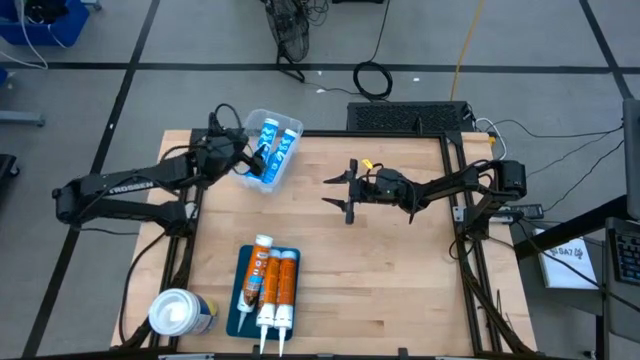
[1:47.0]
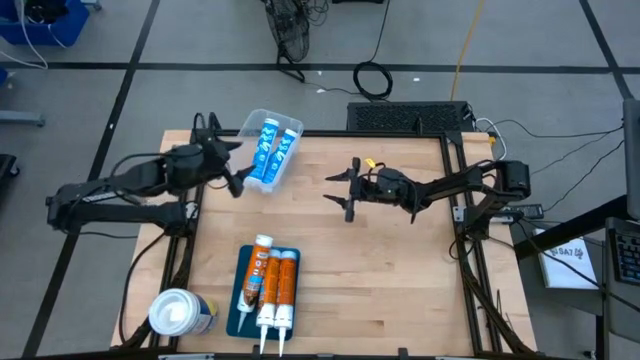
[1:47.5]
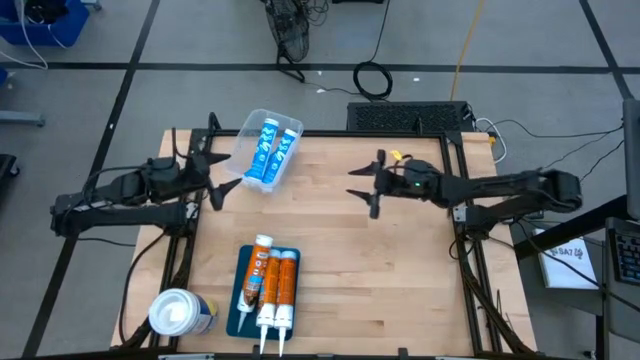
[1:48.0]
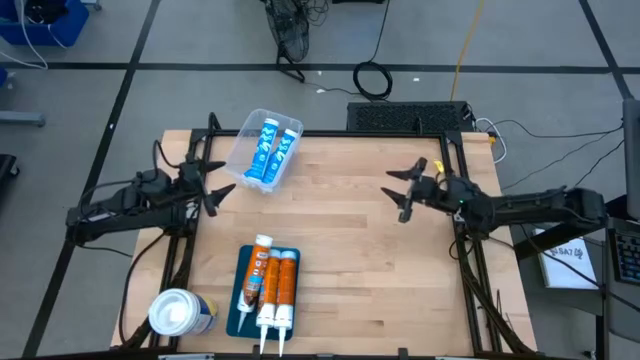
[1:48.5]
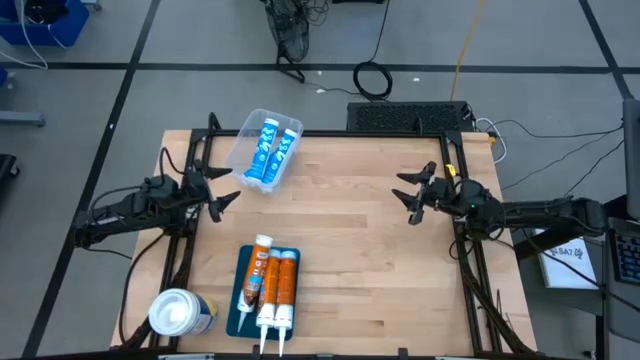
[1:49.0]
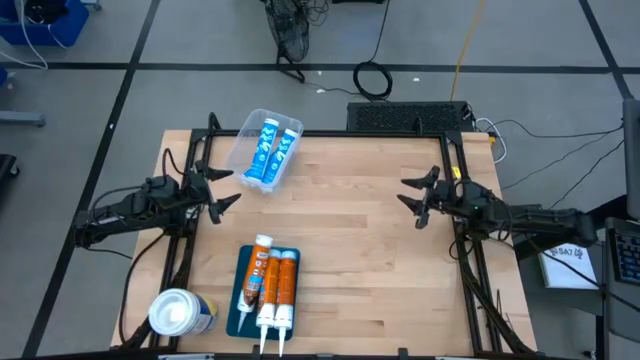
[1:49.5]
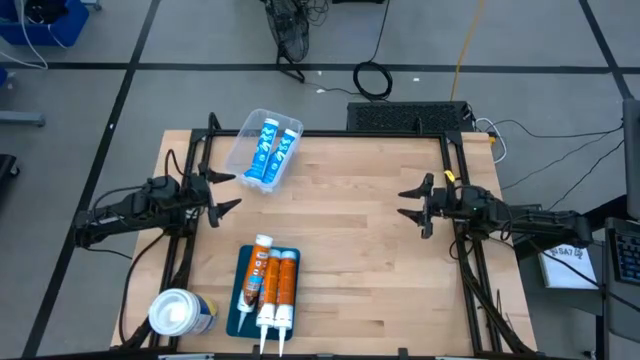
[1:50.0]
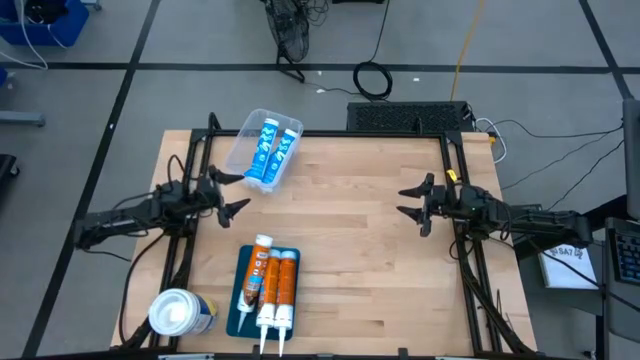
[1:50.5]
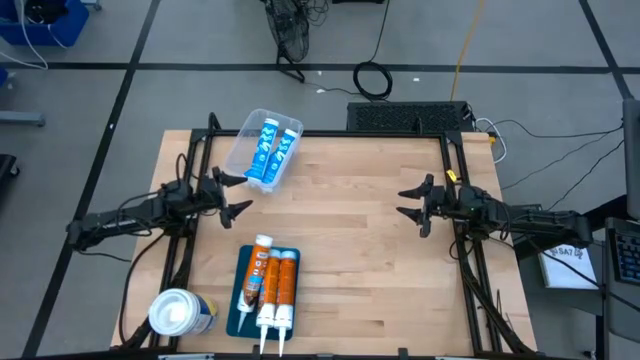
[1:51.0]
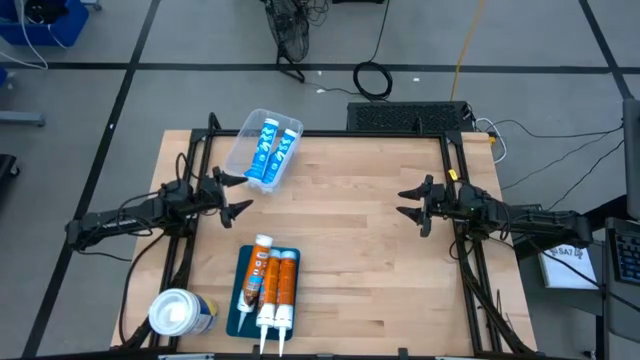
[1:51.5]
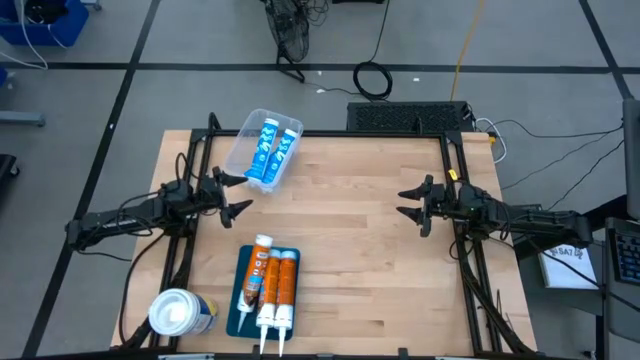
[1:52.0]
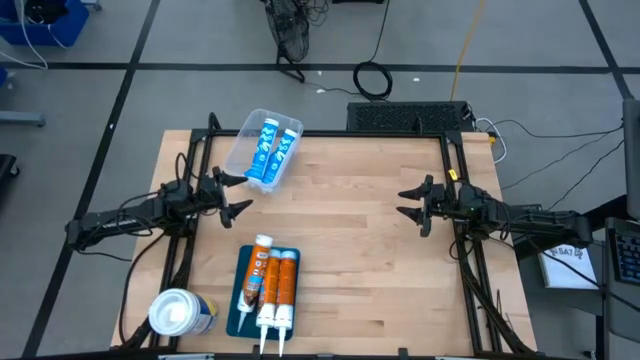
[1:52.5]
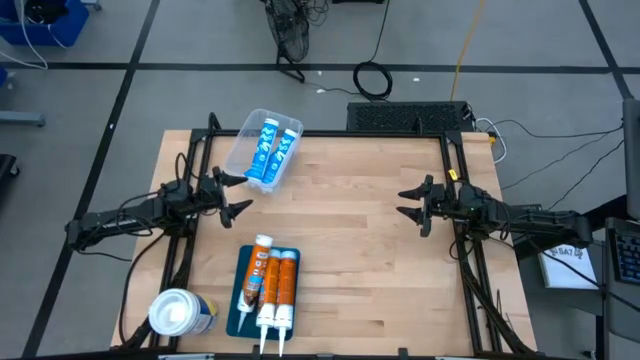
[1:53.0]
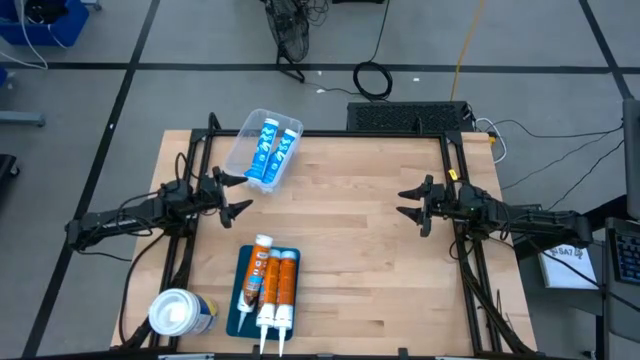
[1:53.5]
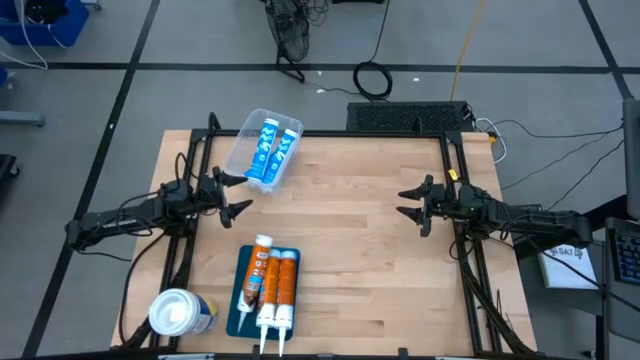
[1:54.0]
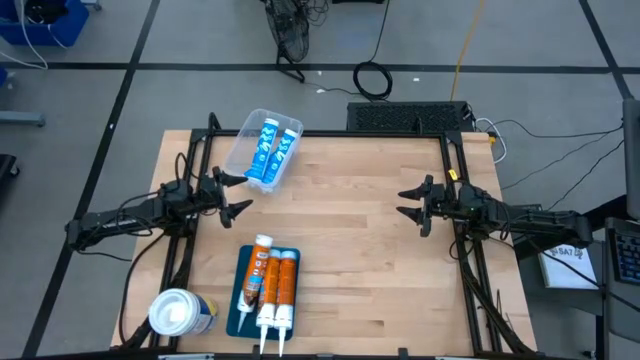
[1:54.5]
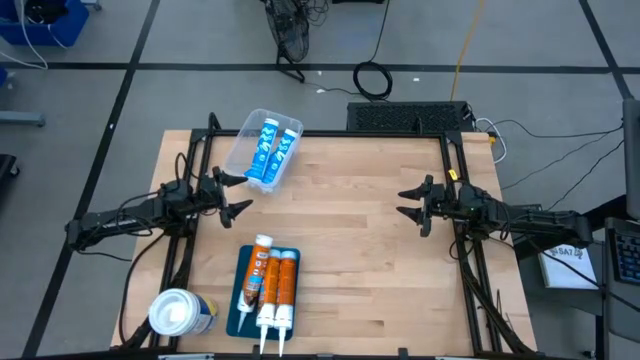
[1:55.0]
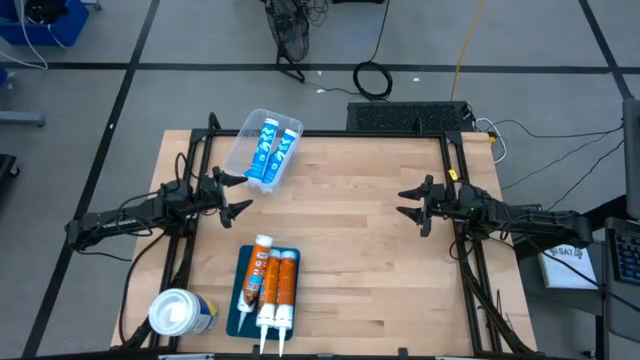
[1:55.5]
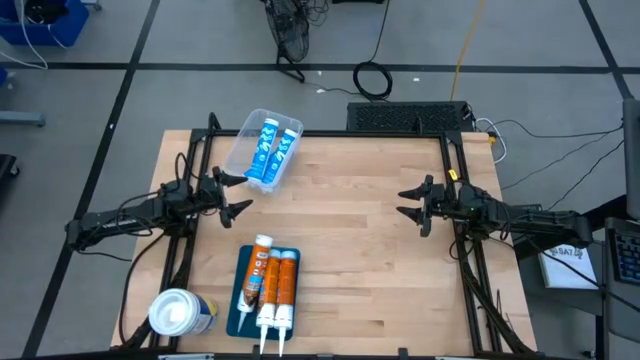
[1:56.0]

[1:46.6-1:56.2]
Task: Pick & place silicon tubes, Sealant and Lysol wipes
Return to Home Position

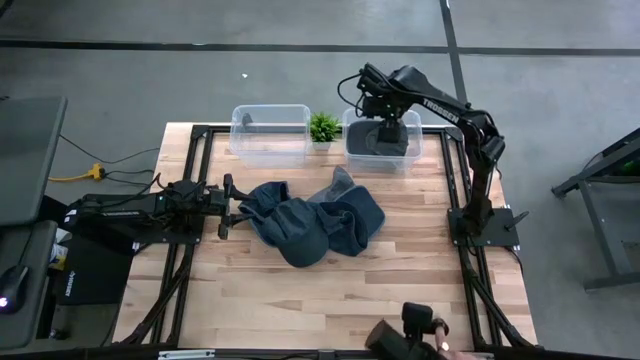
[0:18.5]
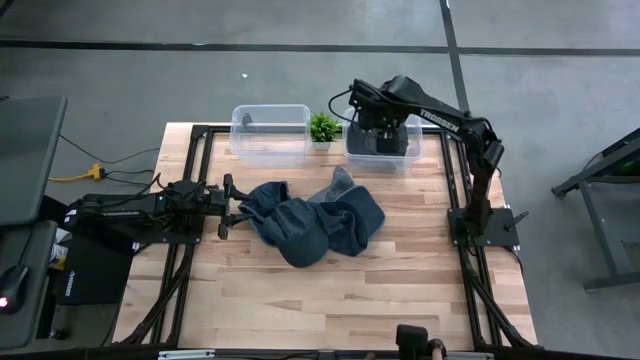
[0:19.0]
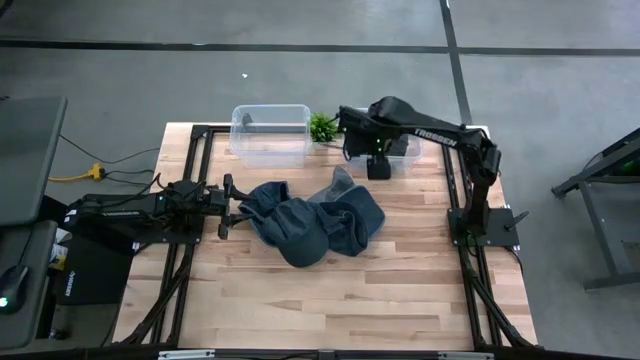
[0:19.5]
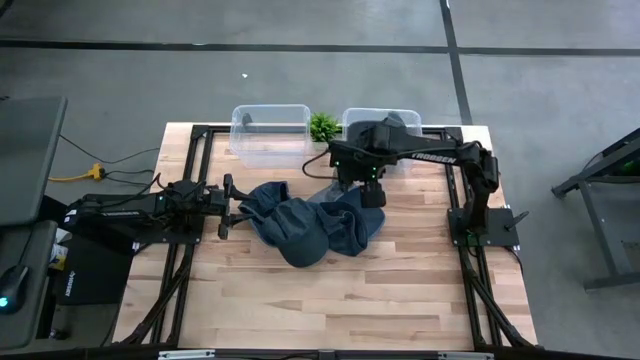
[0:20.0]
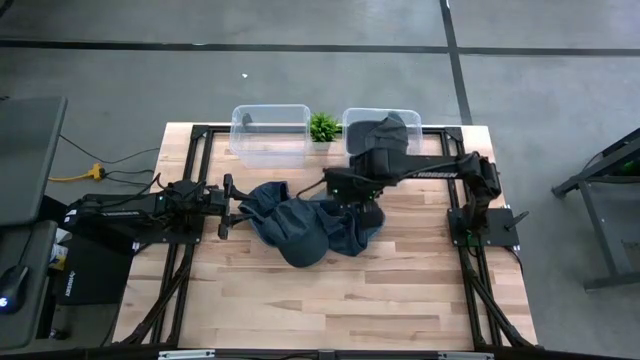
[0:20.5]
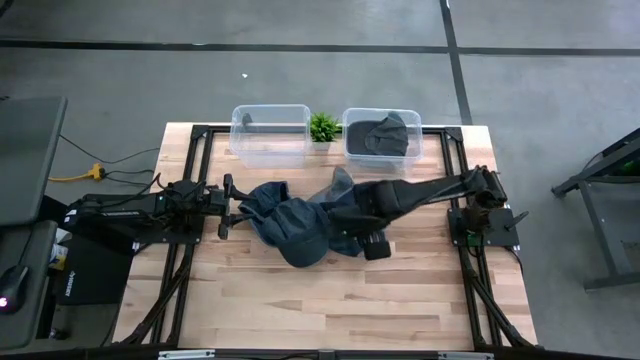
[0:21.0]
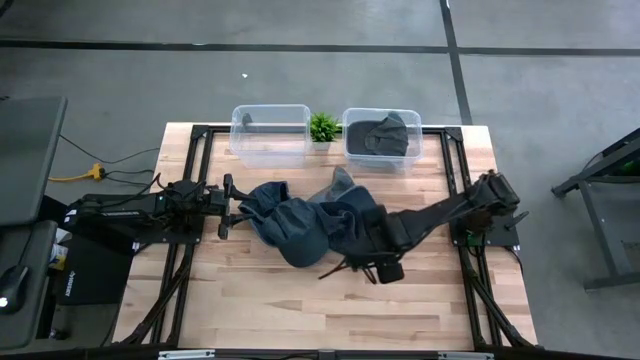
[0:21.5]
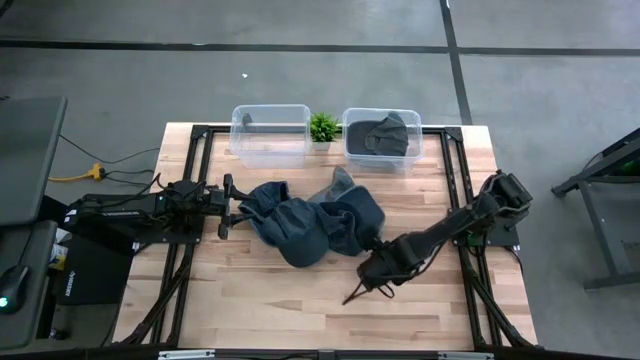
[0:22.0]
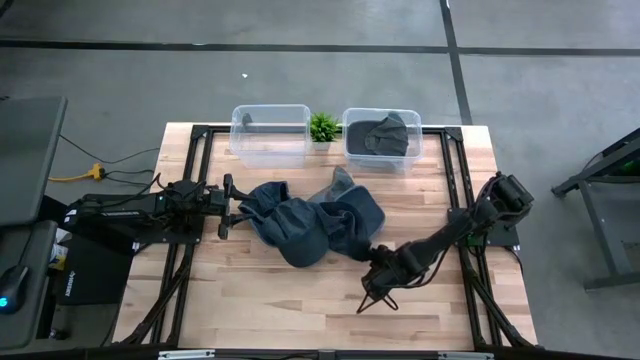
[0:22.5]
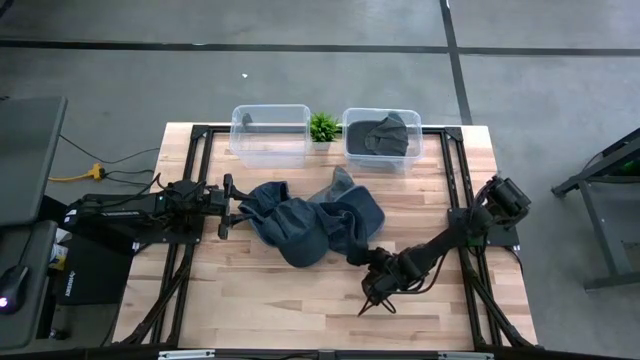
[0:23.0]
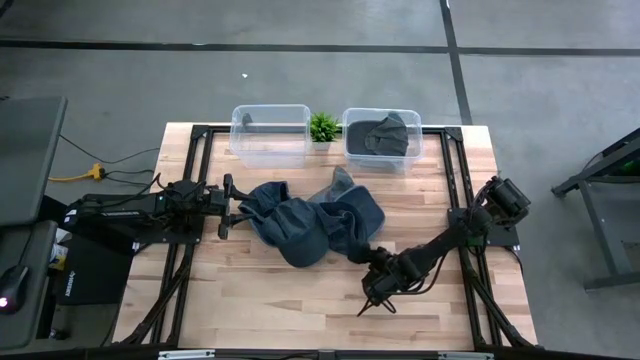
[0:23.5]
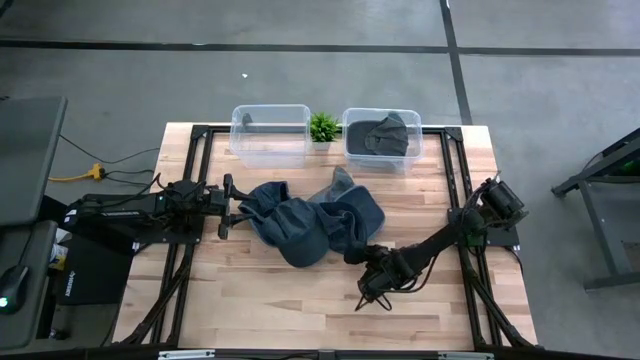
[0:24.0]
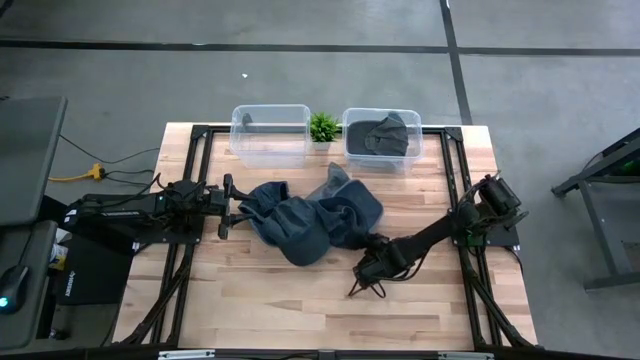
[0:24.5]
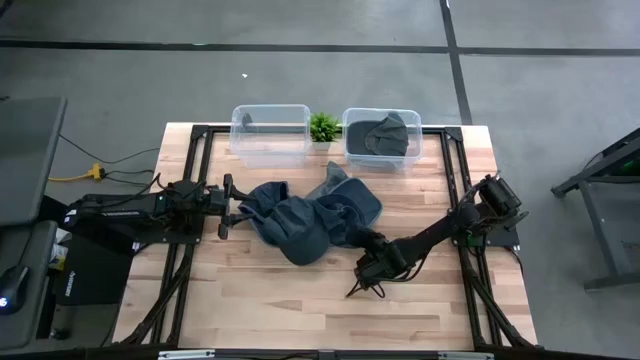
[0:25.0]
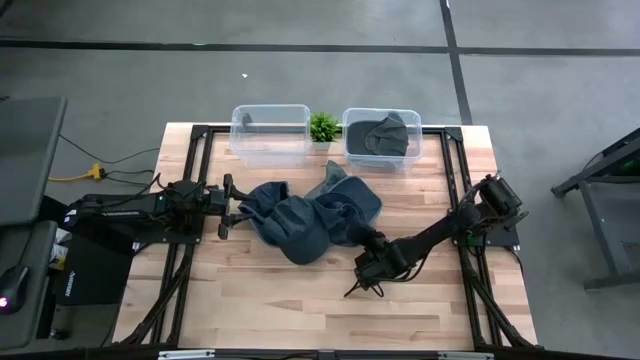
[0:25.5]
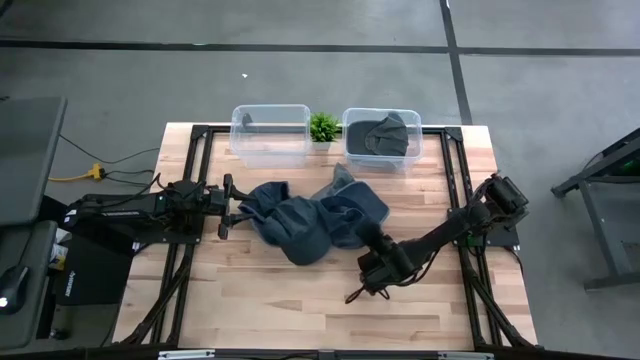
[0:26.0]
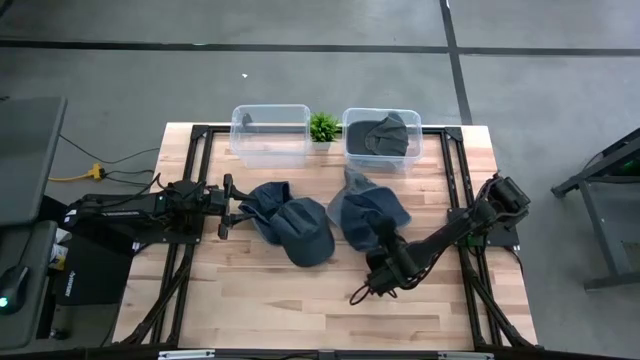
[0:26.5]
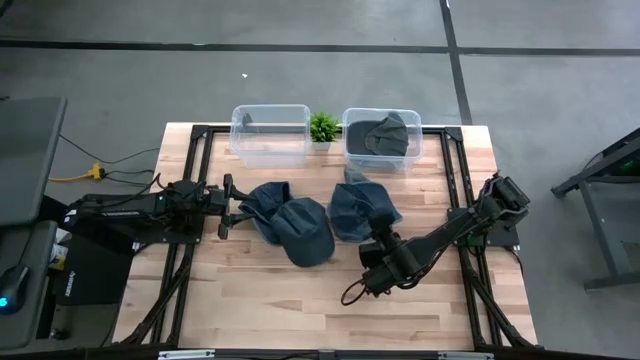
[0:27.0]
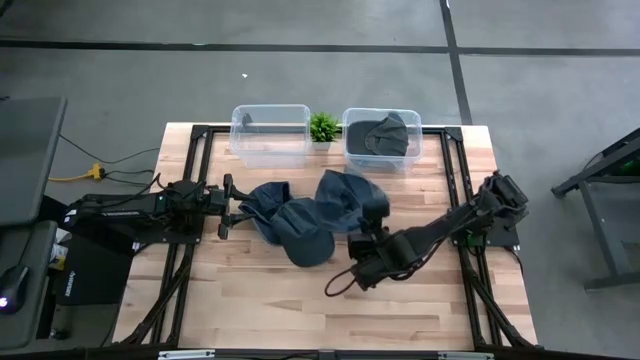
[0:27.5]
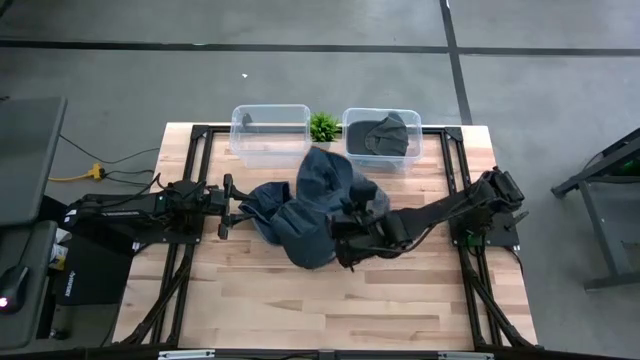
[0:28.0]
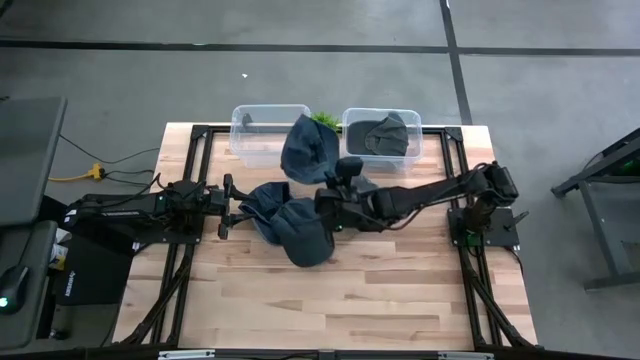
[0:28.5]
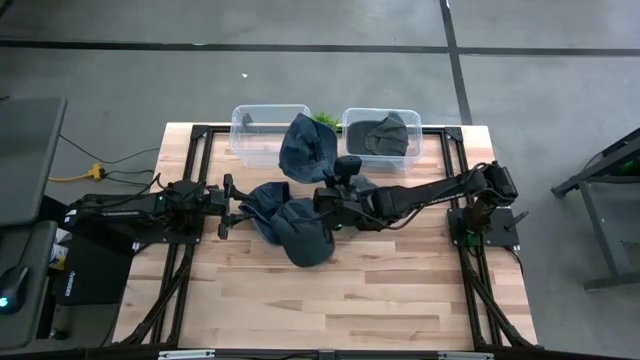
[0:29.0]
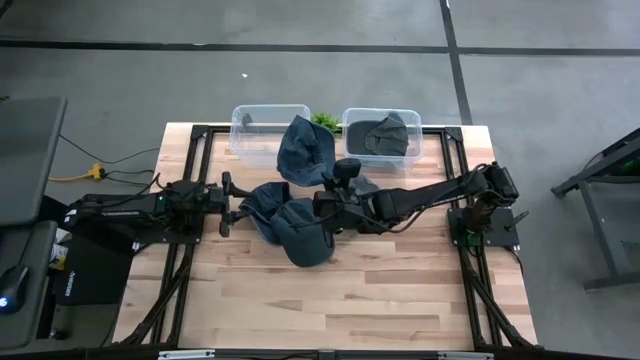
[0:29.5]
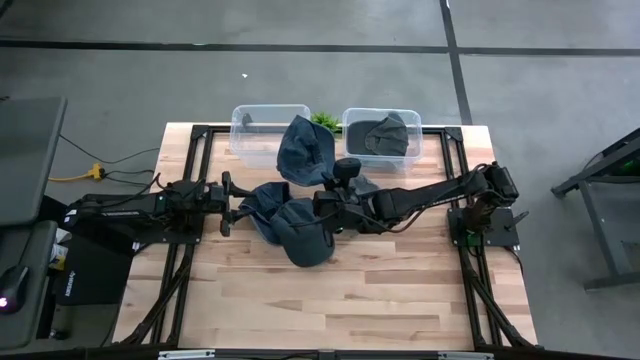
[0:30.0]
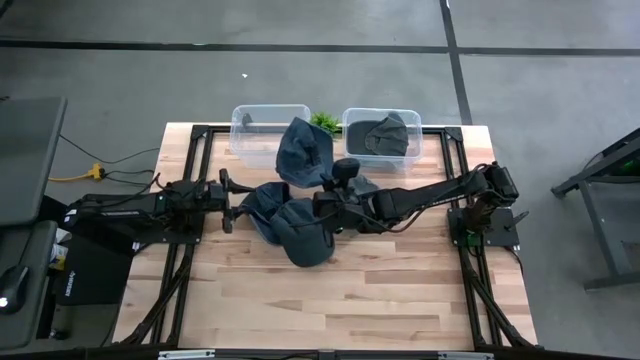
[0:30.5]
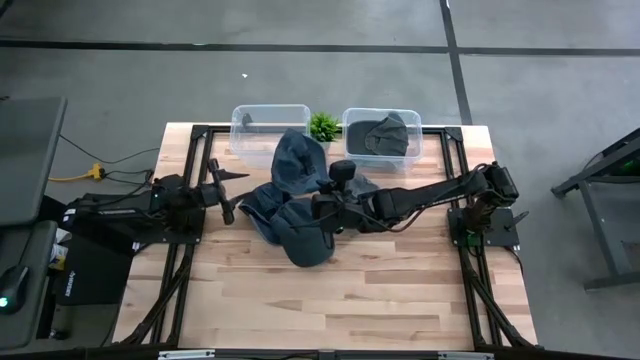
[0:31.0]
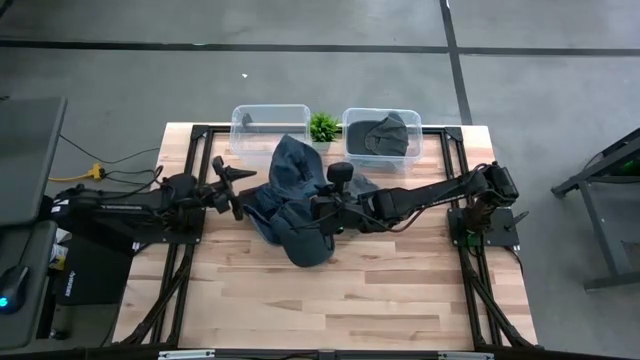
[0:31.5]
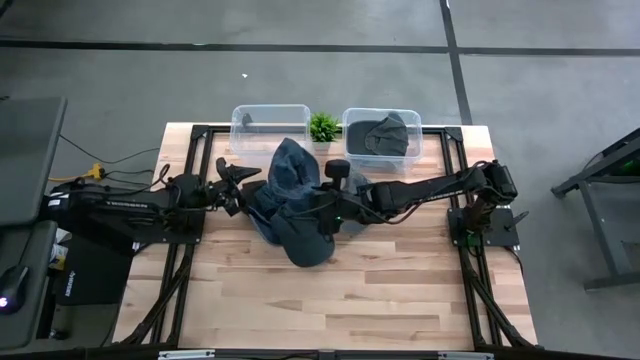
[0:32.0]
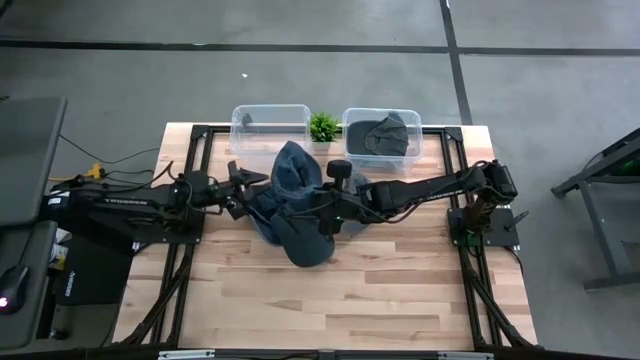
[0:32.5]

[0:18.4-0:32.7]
Task: Pick & Place hat
Put the right blue cap into the left transparent bin
